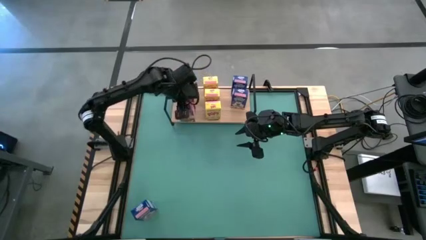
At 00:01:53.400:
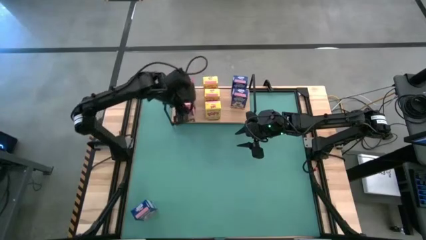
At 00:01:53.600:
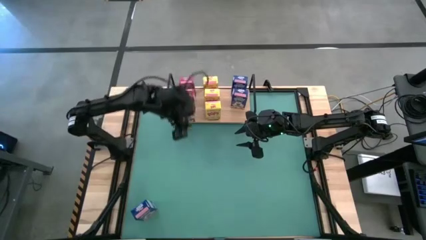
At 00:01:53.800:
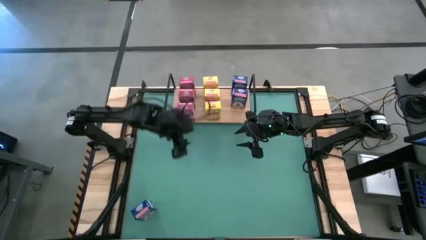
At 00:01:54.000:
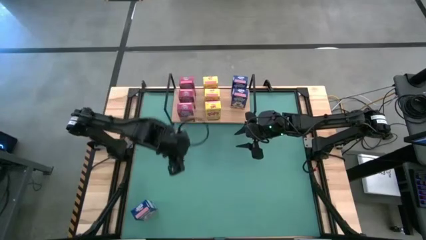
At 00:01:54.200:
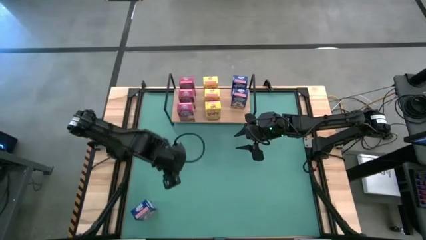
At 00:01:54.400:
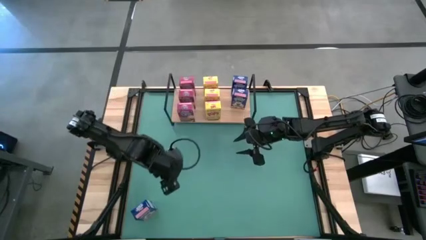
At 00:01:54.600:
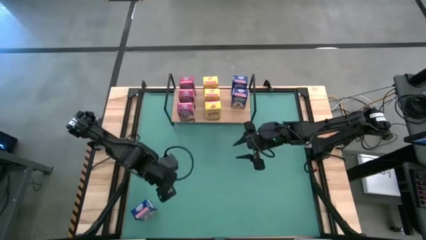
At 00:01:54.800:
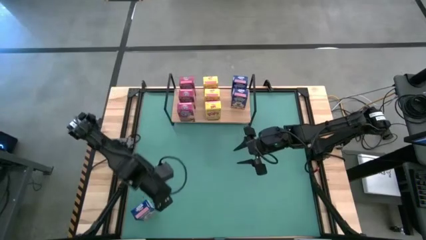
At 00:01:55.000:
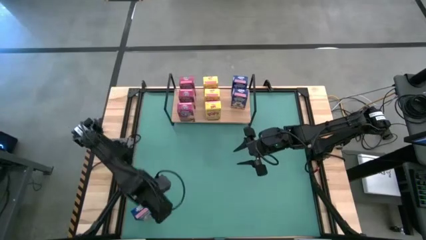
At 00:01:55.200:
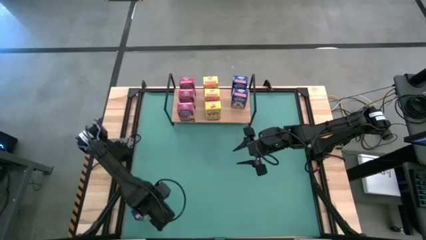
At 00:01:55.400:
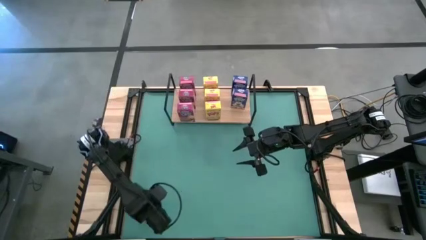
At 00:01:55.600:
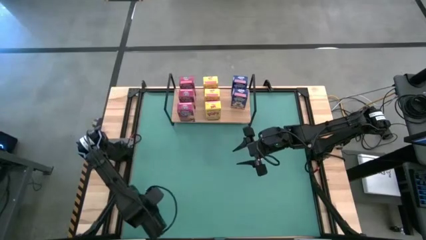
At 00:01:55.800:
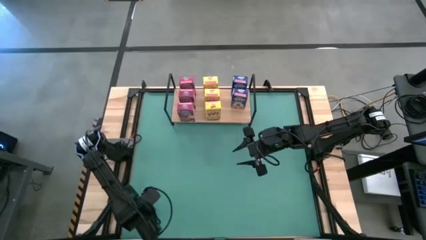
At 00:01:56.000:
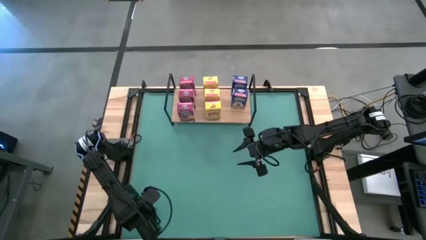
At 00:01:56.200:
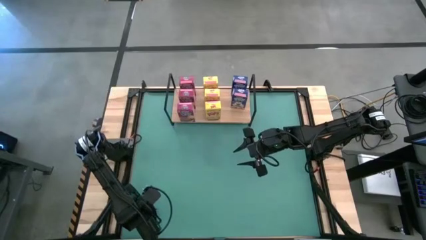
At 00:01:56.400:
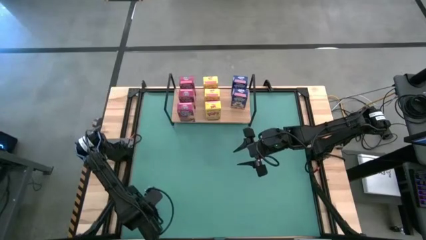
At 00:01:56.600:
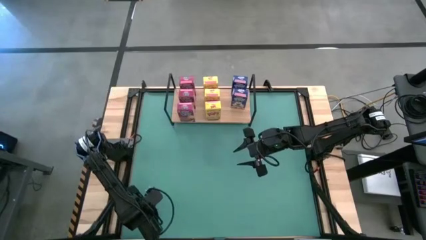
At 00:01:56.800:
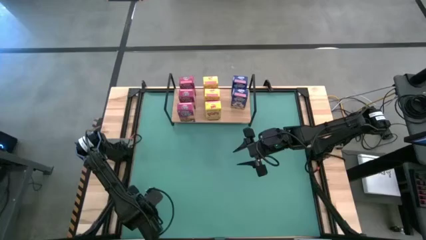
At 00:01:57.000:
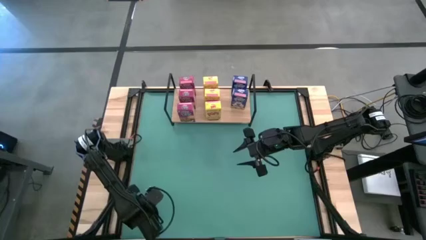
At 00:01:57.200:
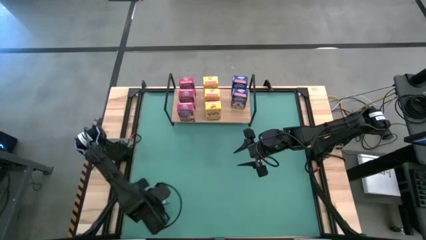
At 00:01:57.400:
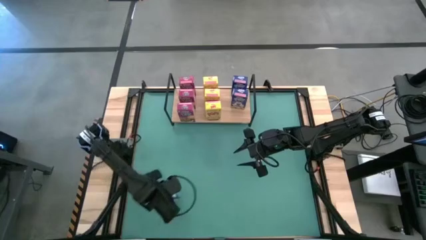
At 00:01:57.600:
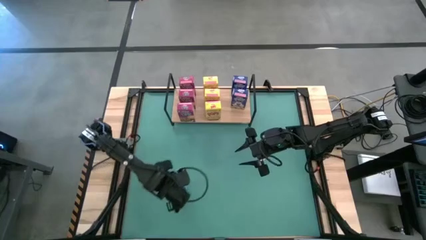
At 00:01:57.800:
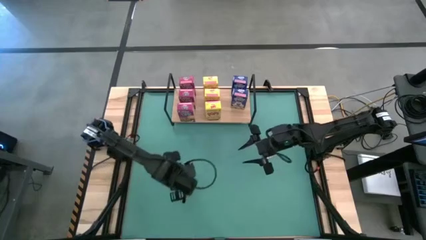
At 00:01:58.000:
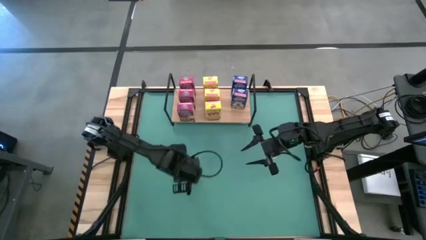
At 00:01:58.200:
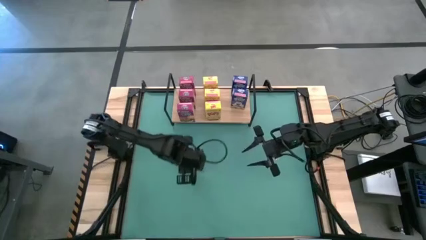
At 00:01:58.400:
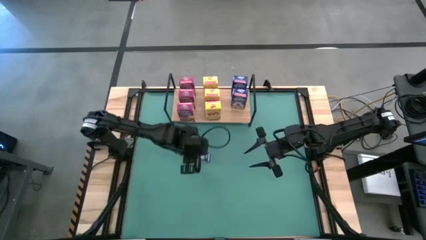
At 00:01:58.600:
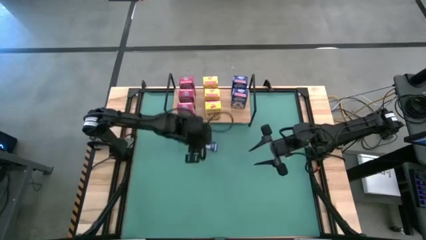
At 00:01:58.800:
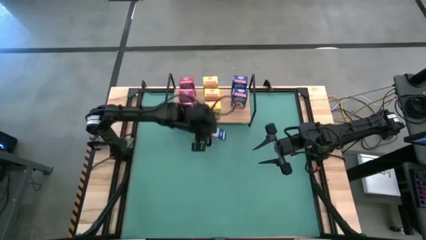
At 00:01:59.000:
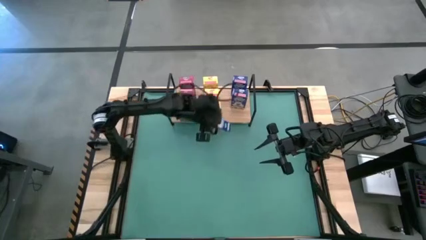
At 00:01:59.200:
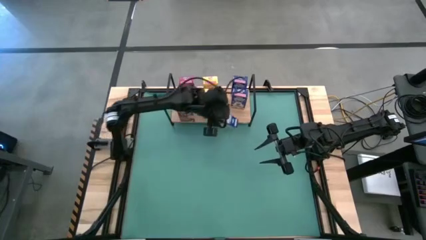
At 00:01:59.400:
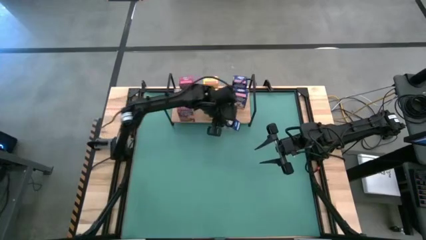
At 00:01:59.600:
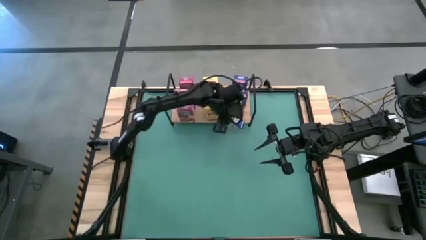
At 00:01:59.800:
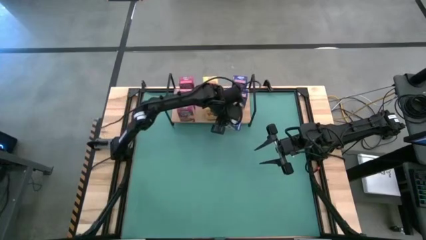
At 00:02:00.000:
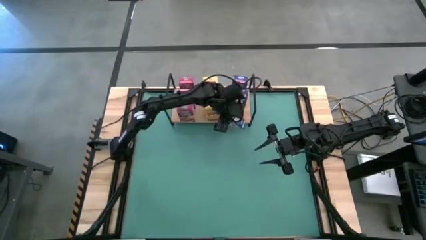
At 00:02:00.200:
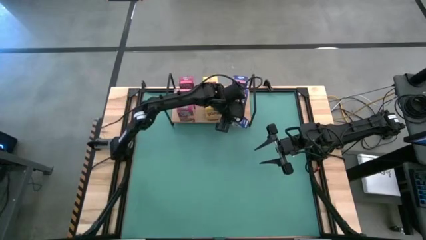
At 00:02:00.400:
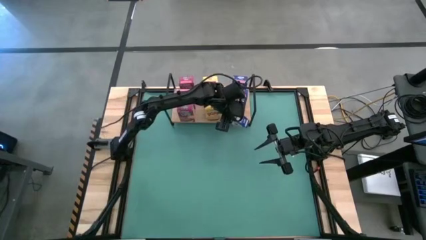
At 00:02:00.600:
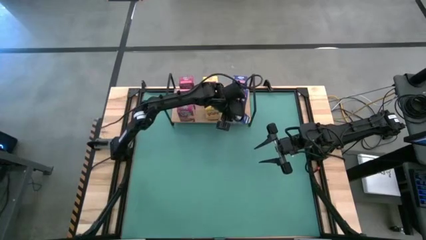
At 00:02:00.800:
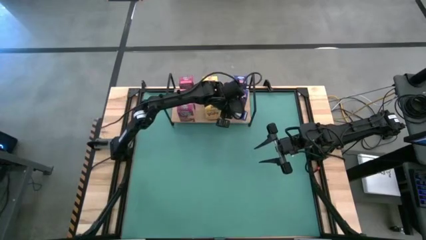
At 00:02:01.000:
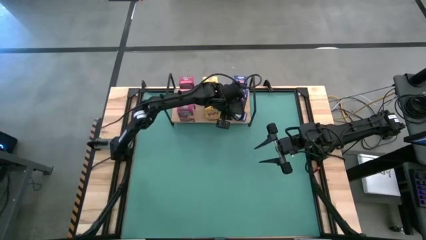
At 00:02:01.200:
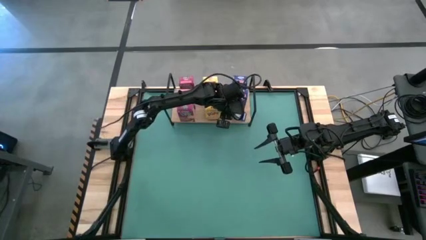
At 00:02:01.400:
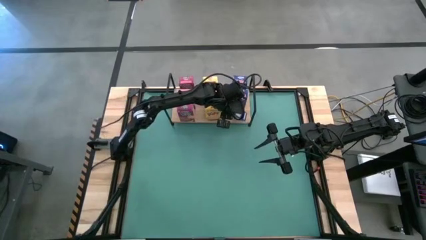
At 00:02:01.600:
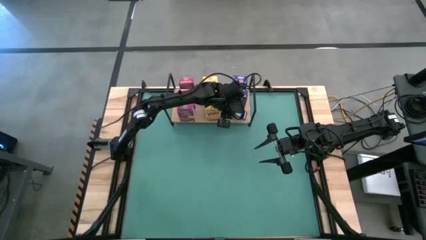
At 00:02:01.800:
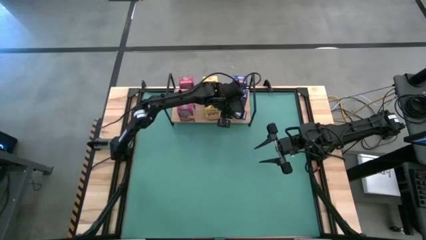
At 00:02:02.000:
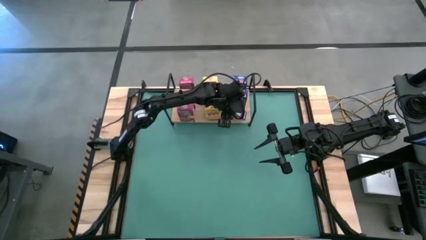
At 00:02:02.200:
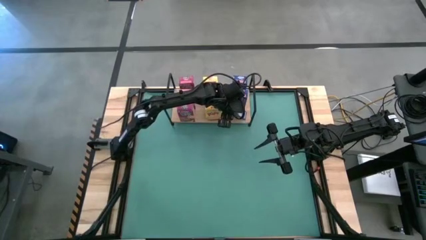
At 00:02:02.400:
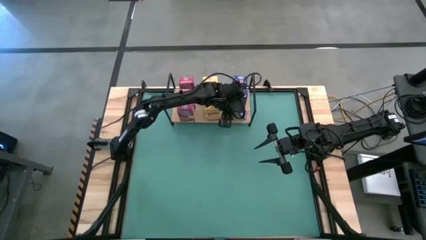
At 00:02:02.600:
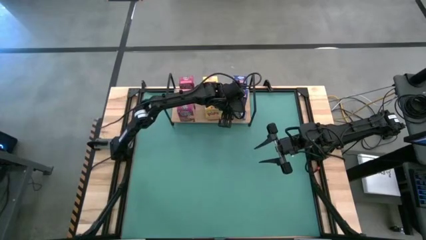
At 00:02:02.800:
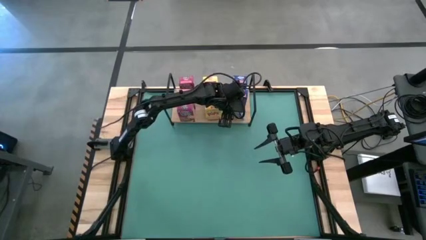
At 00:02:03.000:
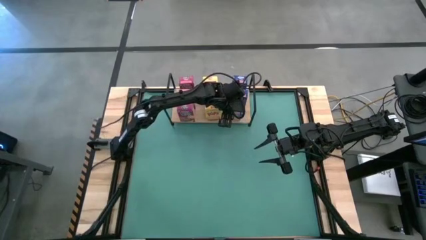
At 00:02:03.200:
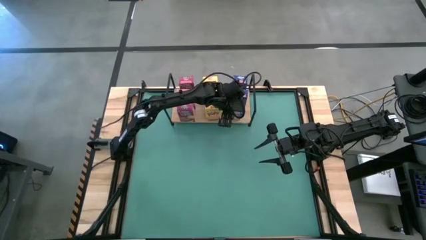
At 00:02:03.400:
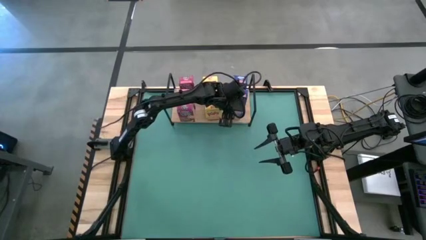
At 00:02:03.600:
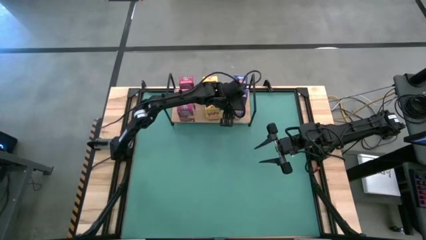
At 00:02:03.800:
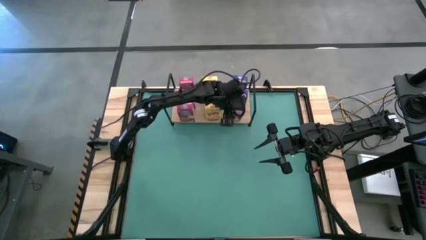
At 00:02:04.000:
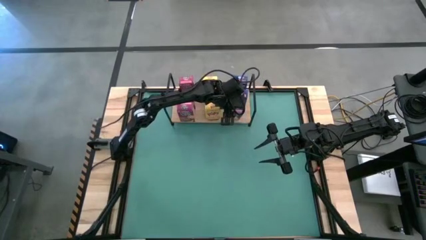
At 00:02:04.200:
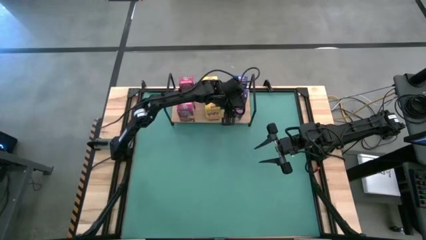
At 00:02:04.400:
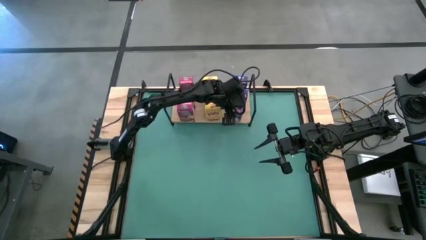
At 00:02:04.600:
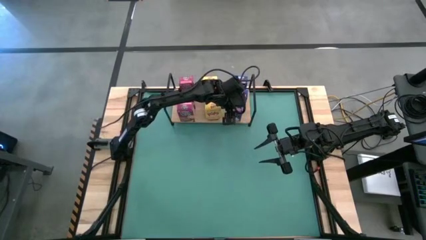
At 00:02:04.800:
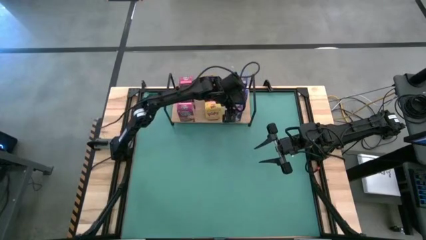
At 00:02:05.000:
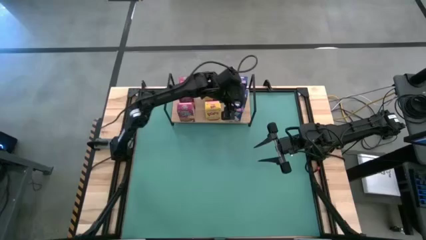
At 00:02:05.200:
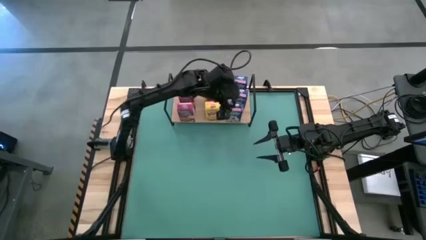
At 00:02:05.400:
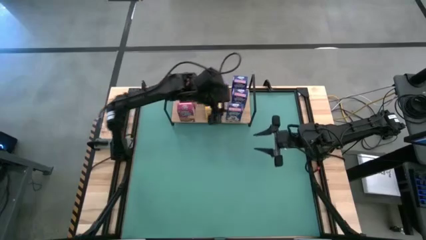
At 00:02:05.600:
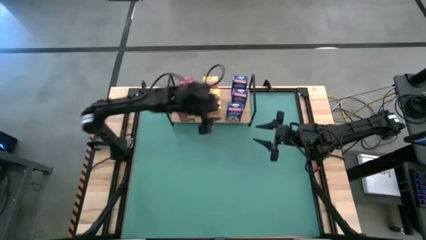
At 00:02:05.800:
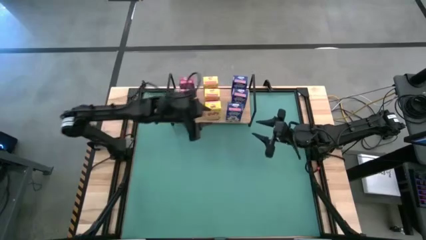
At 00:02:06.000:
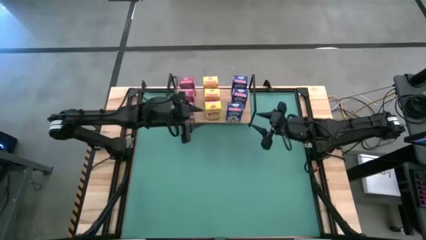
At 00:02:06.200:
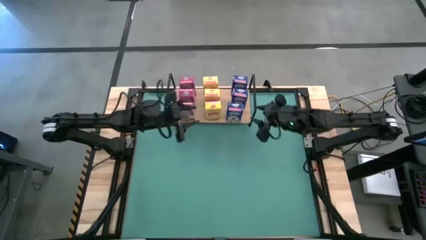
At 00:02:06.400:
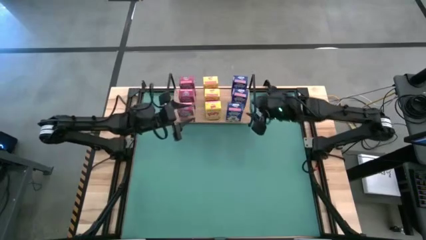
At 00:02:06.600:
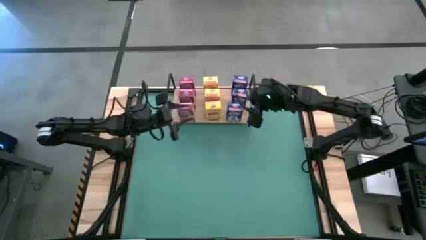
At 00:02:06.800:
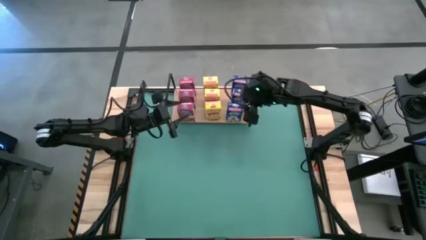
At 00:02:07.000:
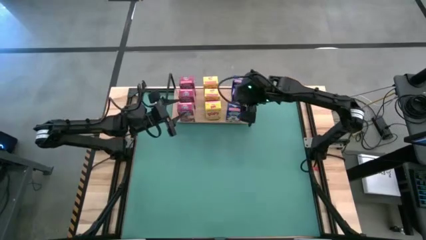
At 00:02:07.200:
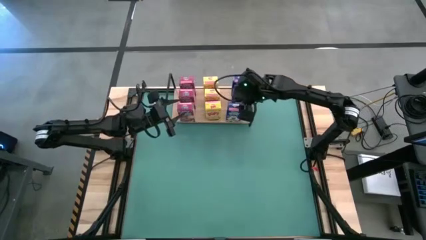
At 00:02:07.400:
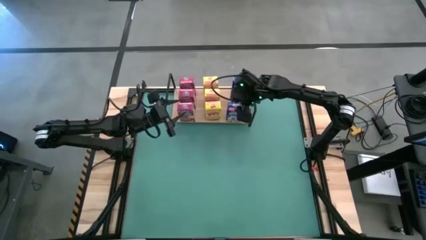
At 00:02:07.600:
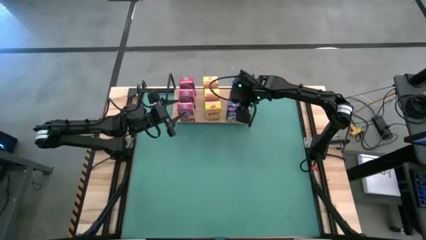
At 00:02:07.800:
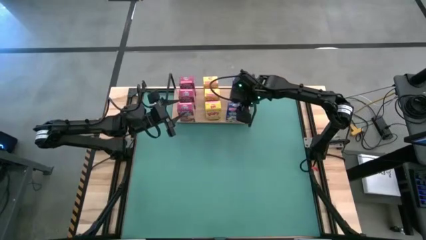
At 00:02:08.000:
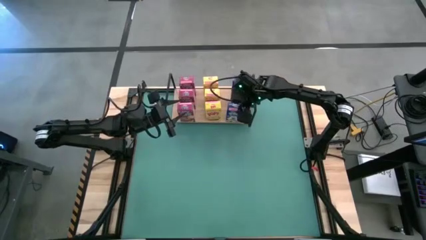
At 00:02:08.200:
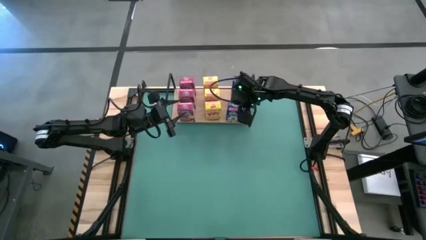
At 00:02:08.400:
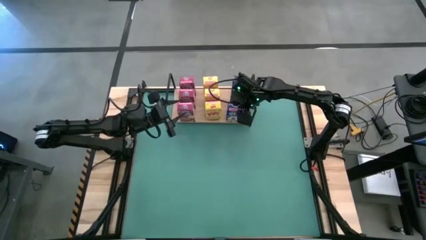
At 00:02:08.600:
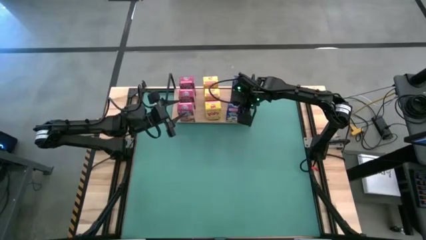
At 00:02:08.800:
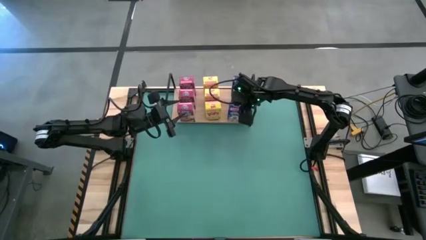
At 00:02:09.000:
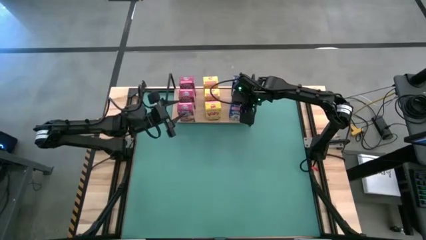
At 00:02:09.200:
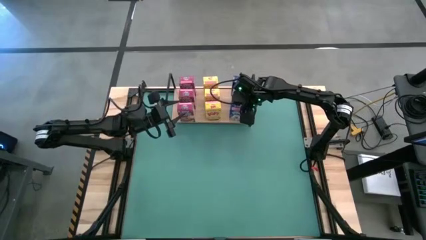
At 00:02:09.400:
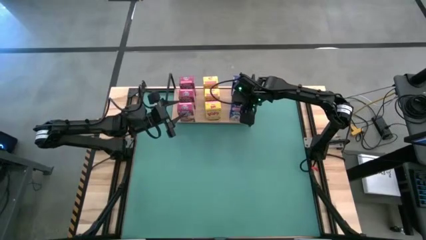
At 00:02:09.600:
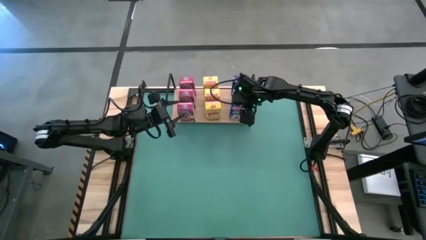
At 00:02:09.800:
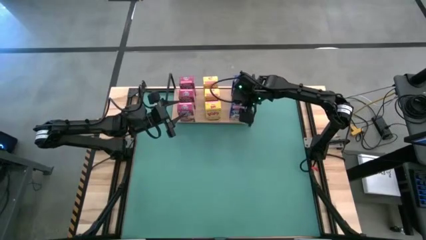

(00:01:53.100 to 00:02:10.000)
Task: Stack cereal on shelf
Put the blue cereal box on the shelf aligned with the other blue cereal boxes
